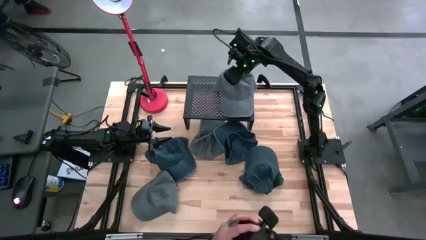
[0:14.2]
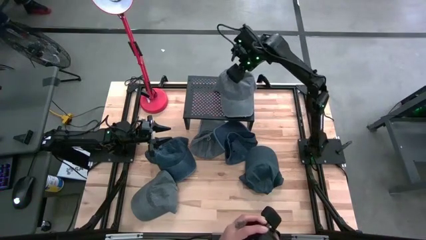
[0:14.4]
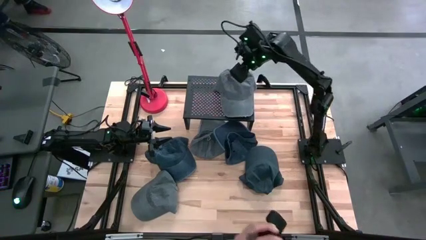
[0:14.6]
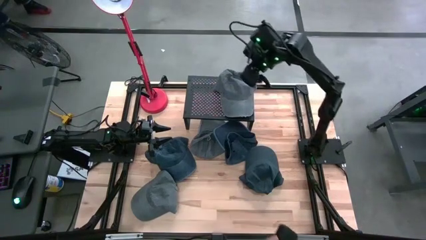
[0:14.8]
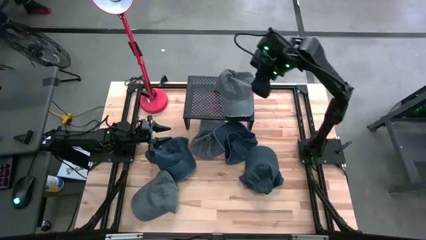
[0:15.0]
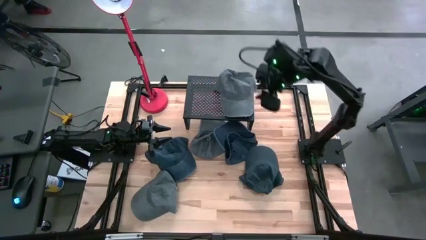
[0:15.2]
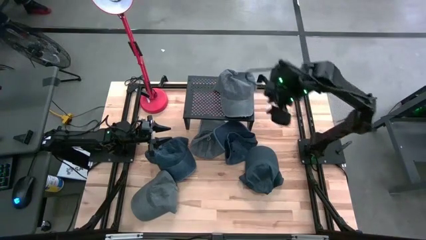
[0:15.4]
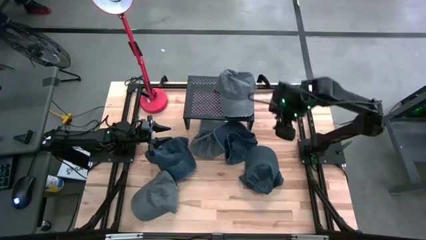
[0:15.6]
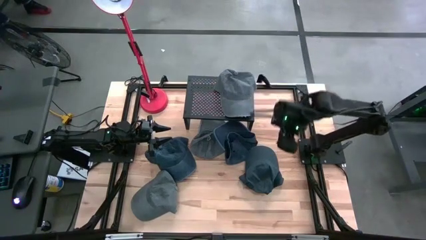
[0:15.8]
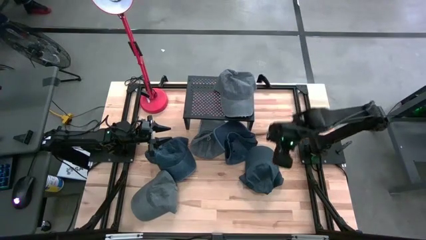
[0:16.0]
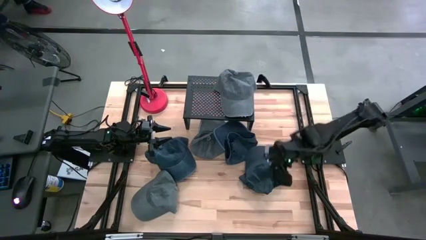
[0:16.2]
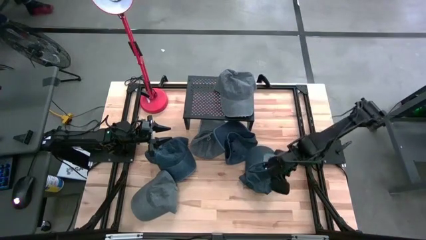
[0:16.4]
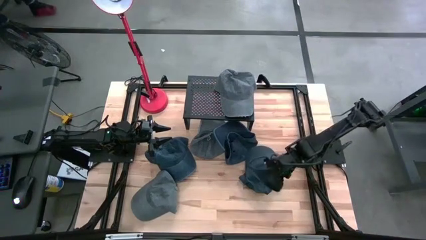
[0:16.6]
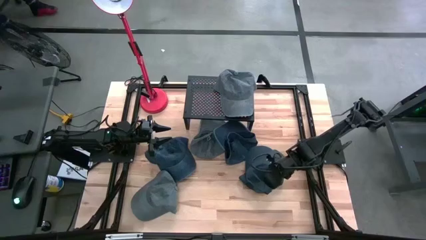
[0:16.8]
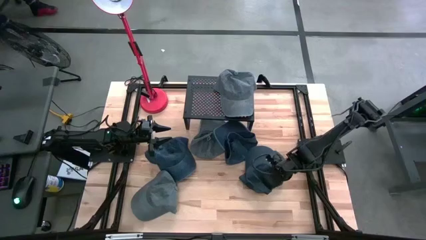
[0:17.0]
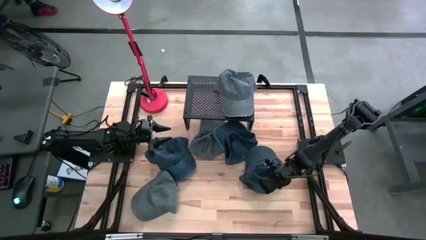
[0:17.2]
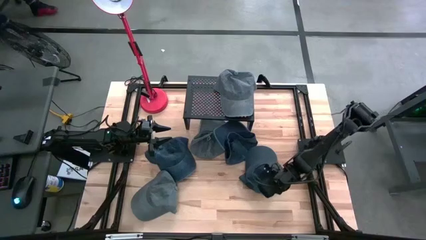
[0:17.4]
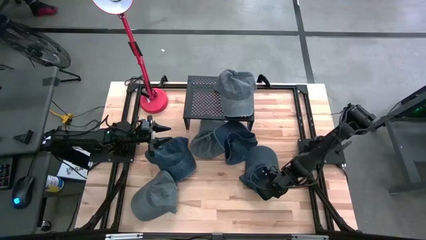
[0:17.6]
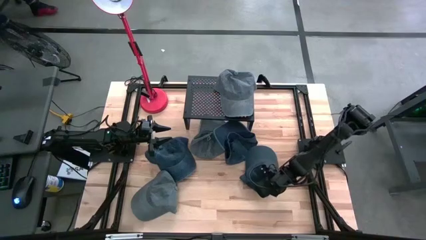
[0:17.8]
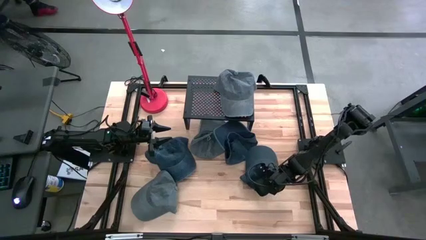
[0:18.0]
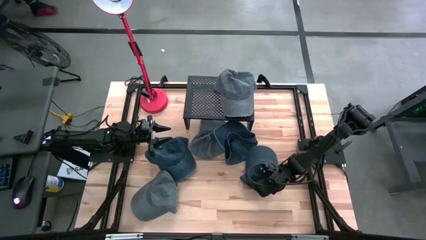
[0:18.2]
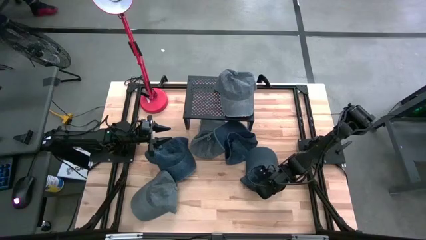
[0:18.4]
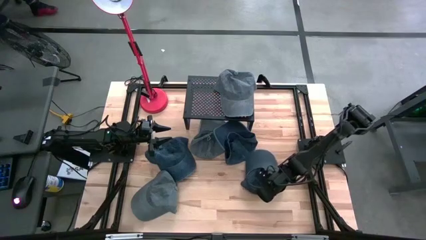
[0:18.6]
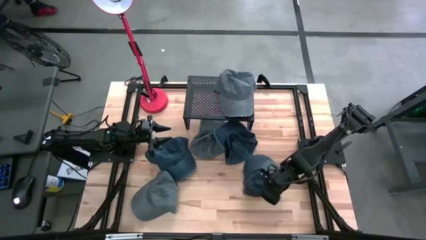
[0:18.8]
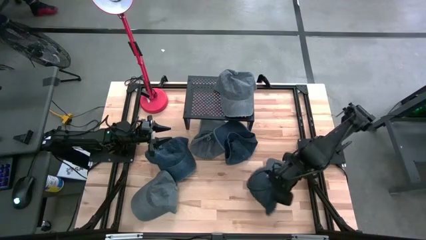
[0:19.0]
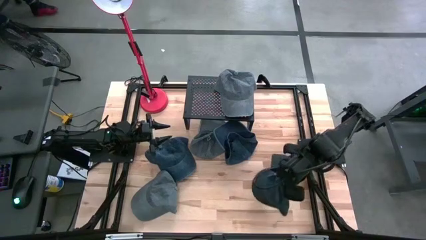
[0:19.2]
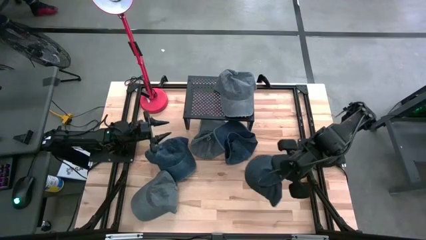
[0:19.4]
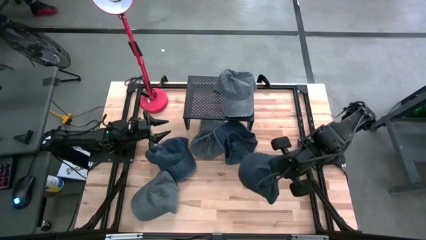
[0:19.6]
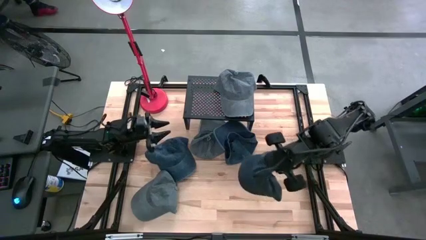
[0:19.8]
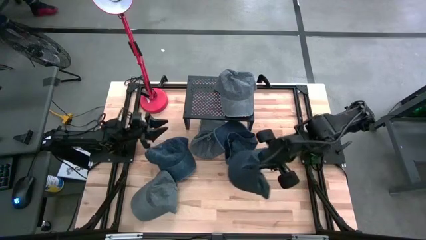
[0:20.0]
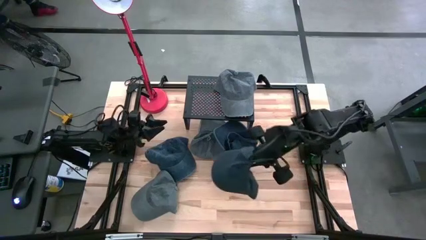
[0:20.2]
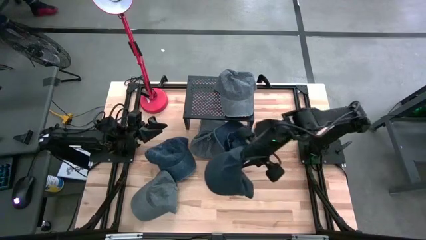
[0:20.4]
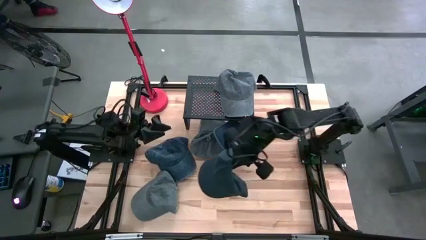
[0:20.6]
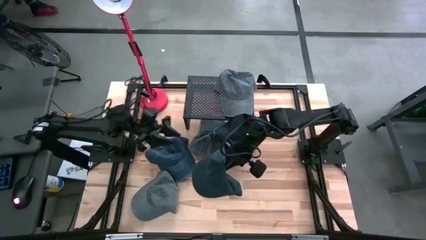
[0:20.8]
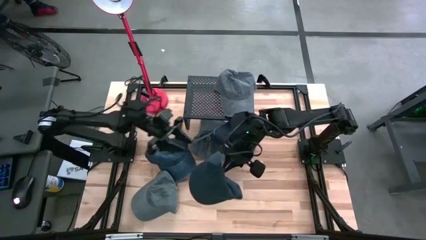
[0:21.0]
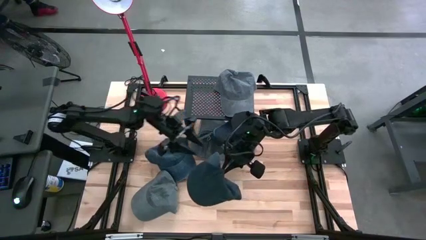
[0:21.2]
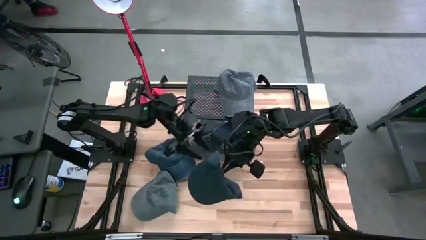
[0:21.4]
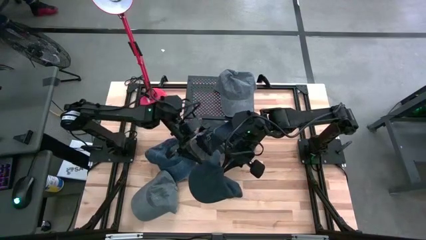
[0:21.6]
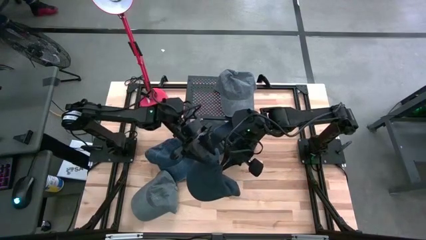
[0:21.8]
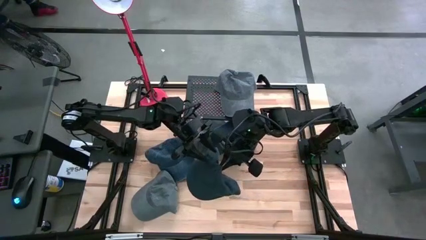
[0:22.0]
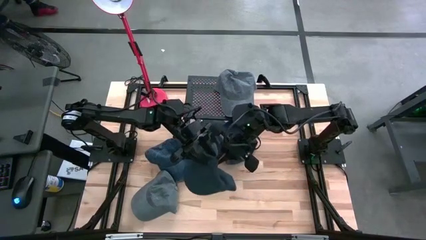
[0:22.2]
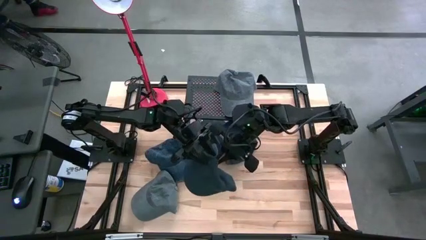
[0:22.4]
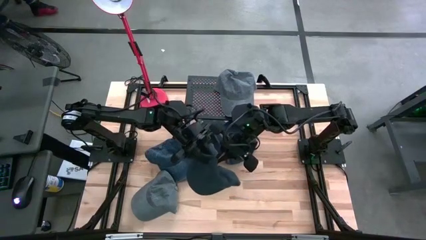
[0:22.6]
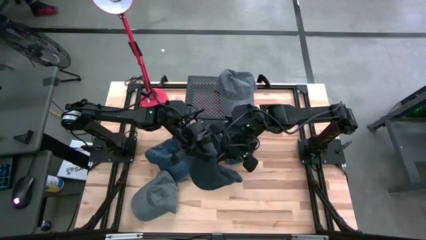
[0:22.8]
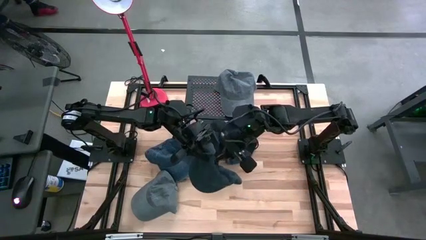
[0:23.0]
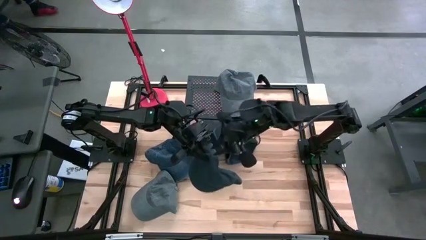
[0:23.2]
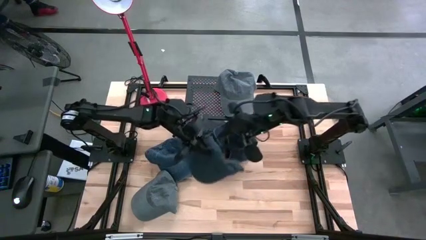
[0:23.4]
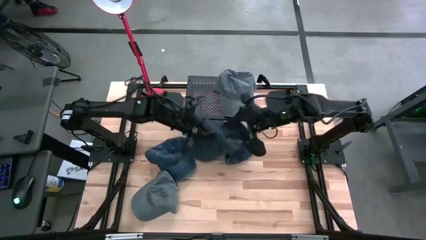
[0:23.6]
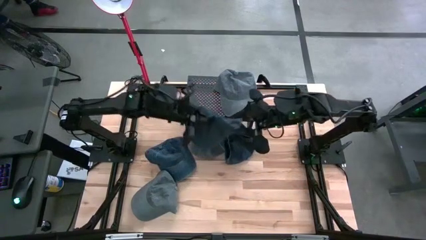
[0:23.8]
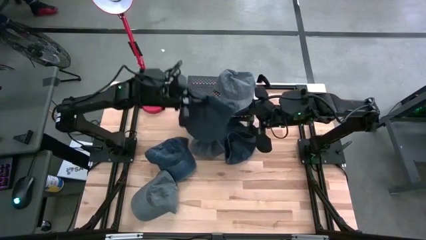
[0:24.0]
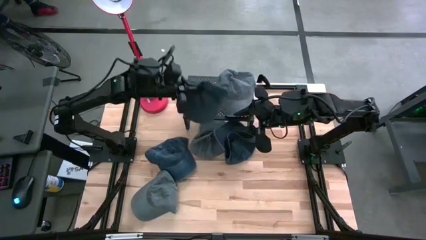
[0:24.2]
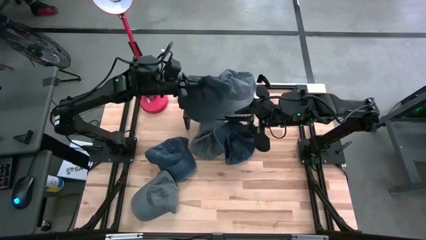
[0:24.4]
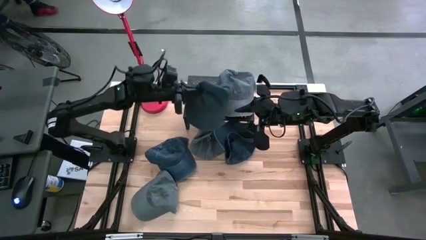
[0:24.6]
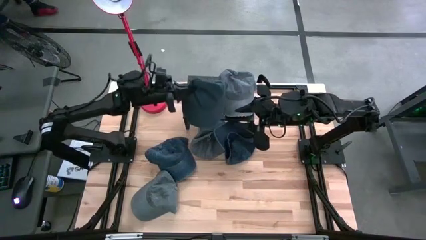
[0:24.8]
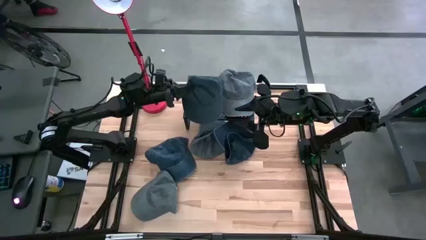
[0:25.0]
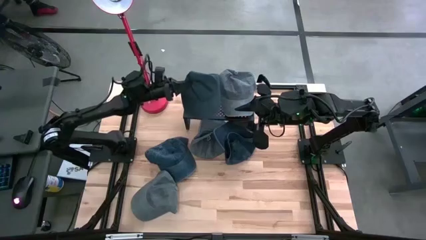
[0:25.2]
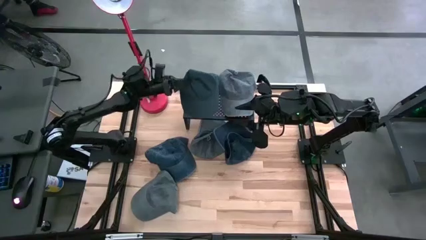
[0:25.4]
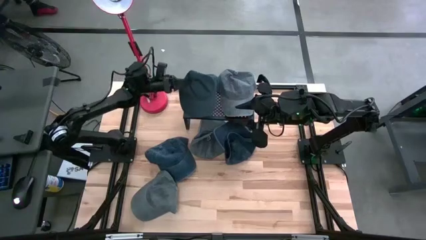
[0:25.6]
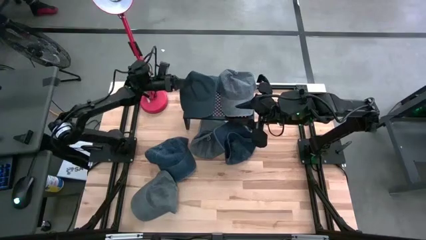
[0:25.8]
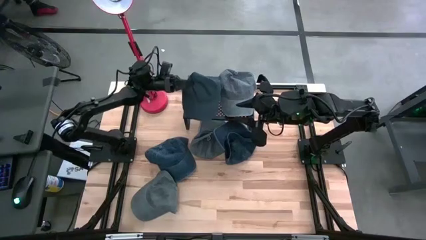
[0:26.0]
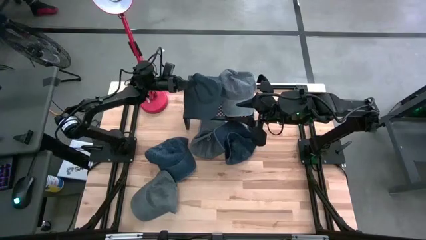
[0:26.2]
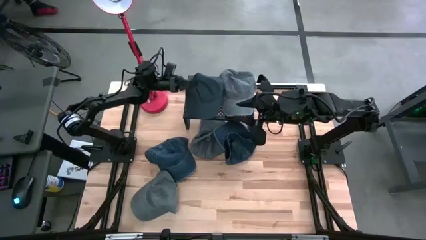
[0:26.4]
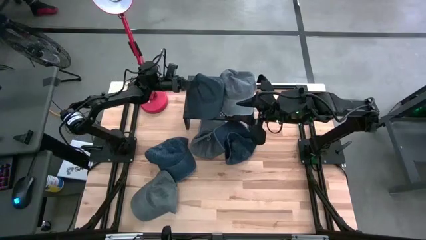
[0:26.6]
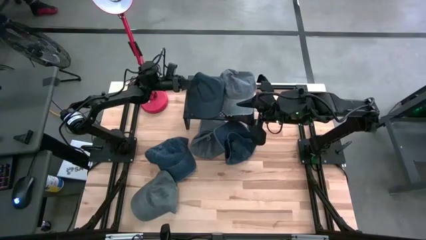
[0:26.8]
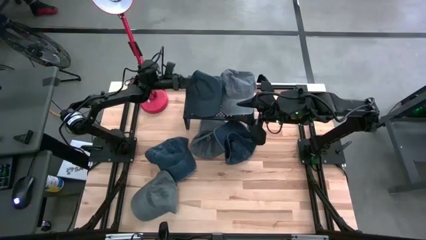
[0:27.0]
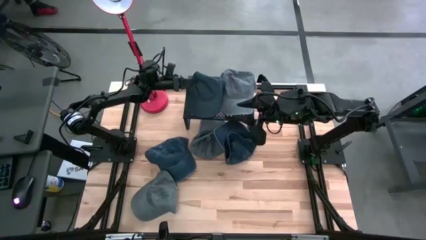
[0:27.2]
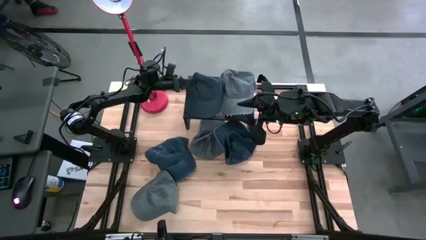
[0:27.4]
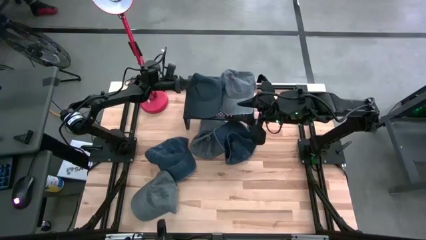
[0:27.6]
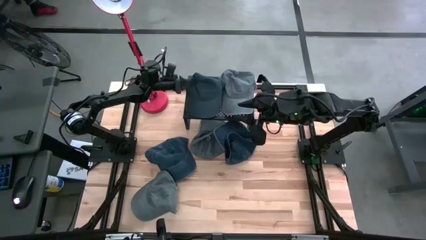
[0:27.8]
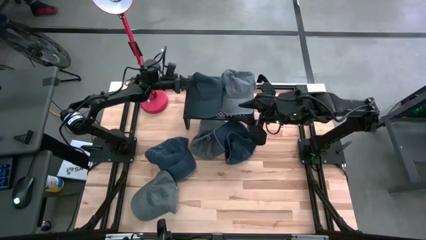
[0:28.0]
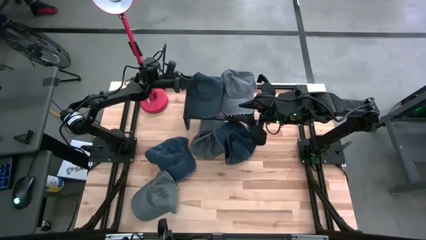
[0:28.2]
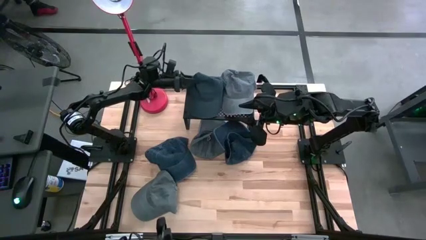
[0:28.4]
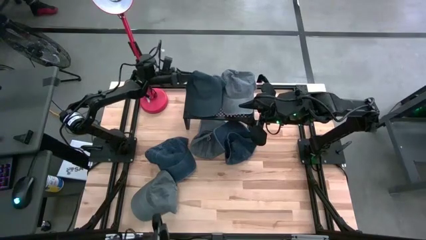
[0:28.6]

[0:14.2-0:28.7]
Task: Pick & Place hat
Put the right blue cap on the shelf

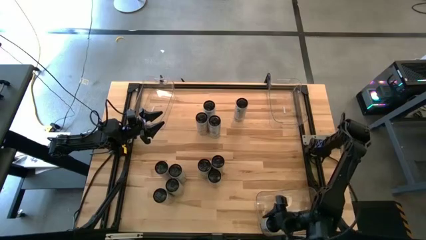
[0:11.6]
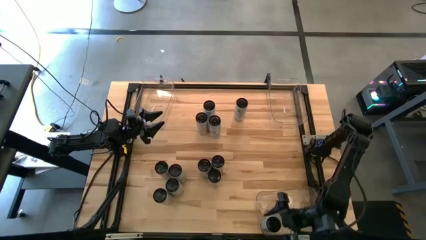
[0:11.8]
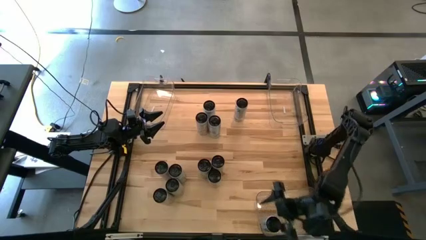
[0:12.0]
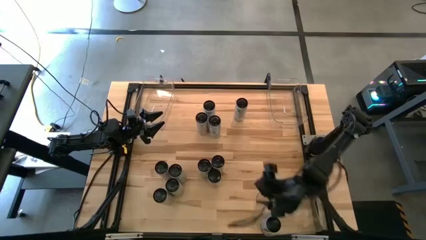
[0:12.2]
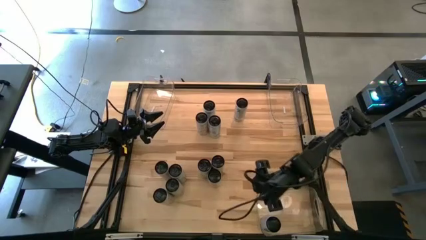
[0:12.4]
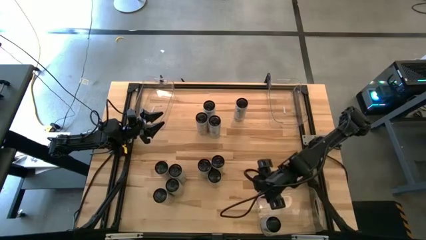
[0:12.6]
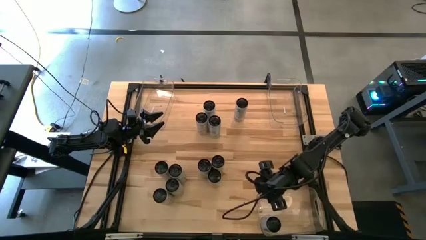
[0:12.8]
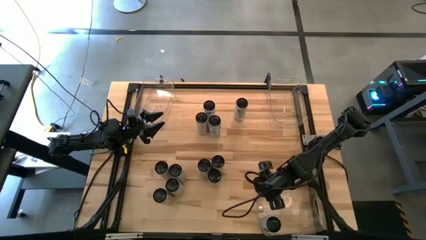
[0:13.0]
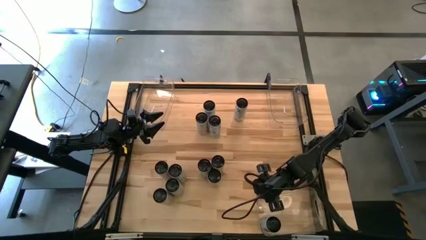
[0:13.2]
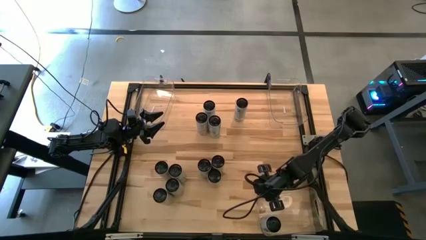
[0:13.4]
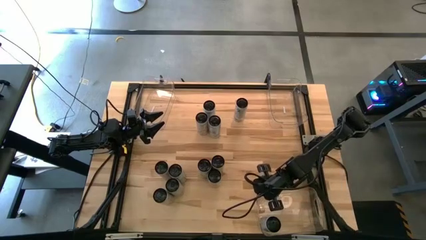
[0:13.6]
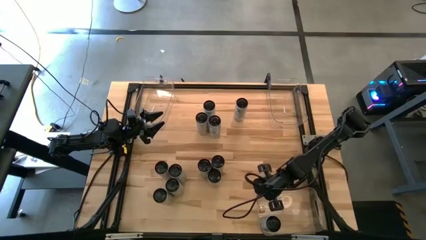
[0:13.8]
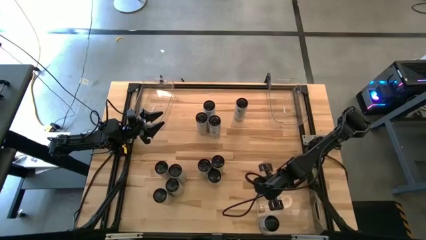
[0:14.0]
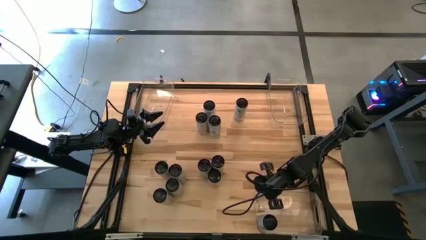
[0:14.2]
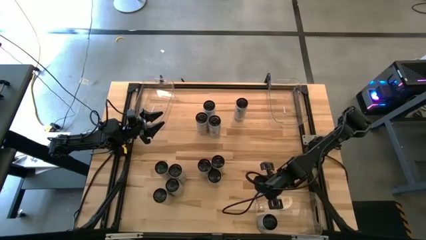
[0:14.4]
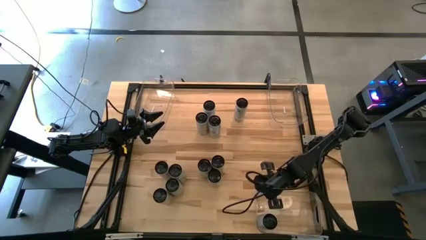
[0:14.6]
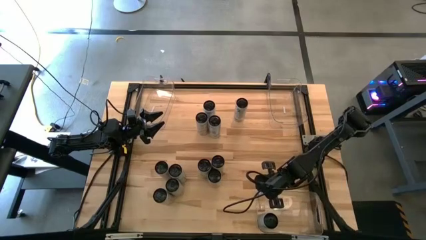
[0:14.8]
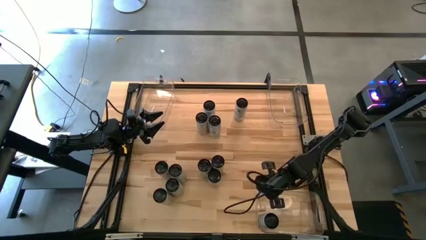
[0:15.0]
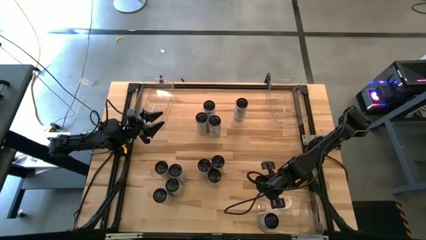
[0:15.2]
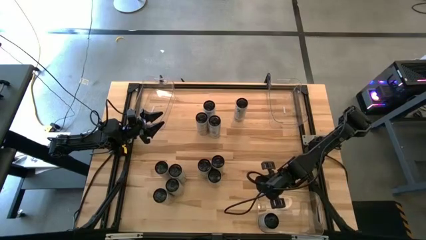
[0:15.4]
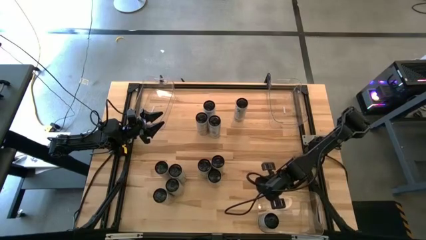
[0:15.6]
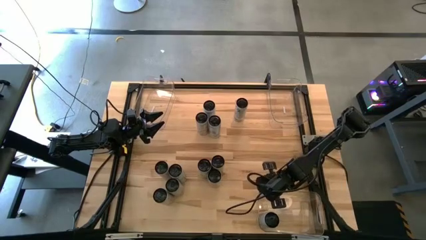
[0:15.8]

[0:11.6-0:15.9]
Task: Sort soda cans
Adjust the bottom right transparent bin
